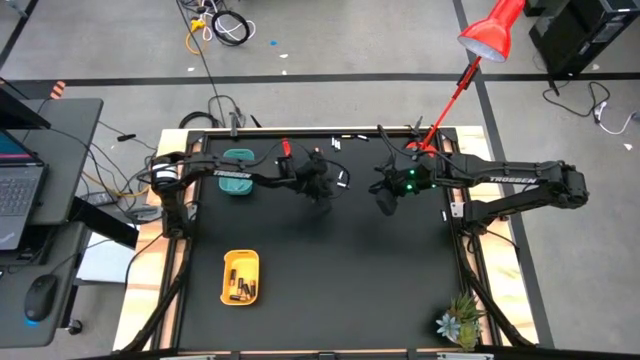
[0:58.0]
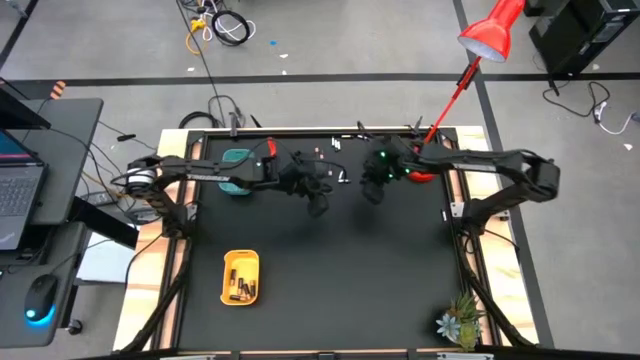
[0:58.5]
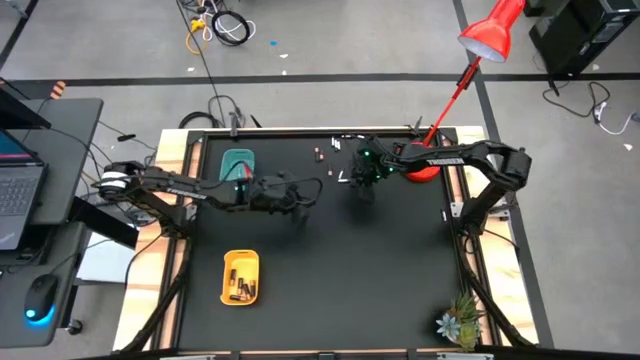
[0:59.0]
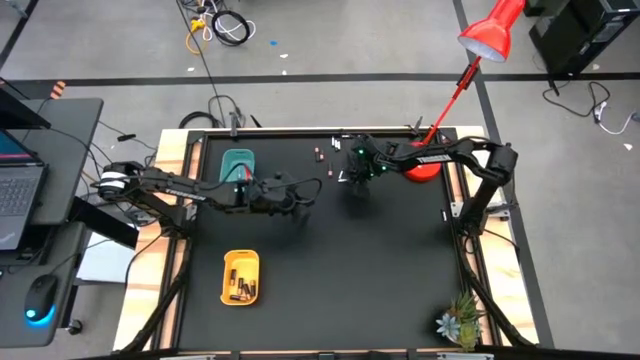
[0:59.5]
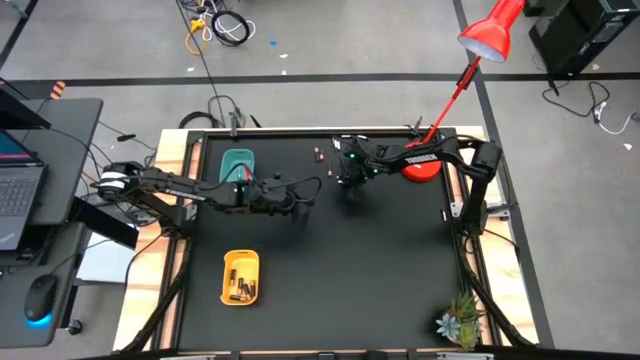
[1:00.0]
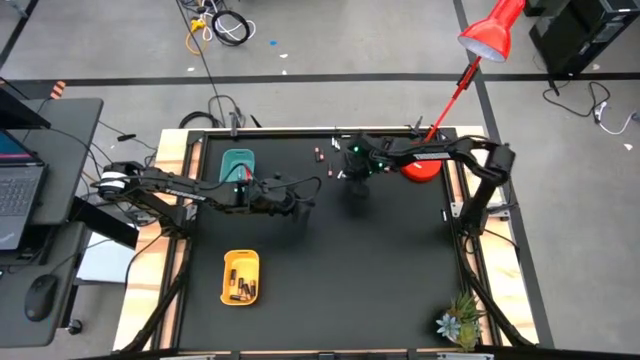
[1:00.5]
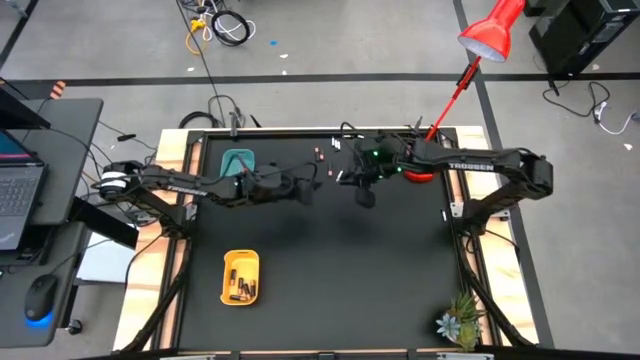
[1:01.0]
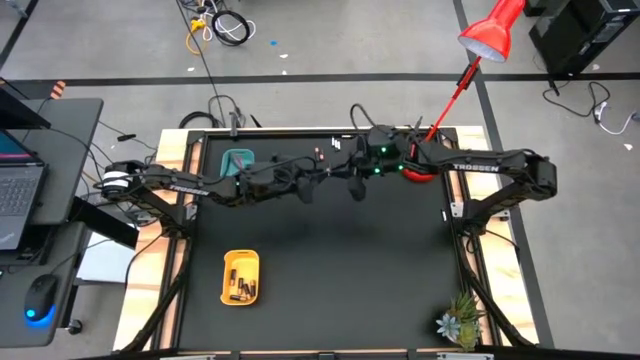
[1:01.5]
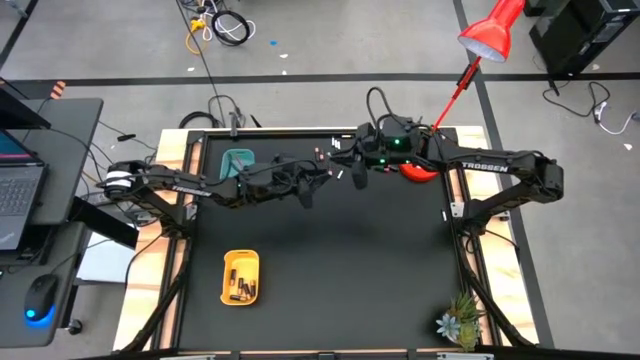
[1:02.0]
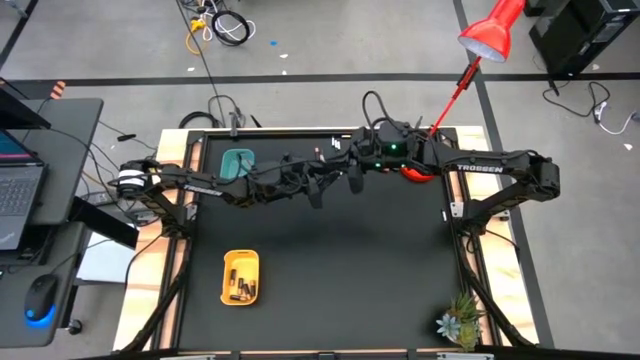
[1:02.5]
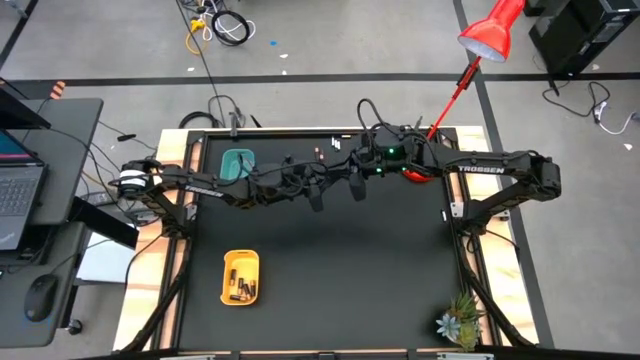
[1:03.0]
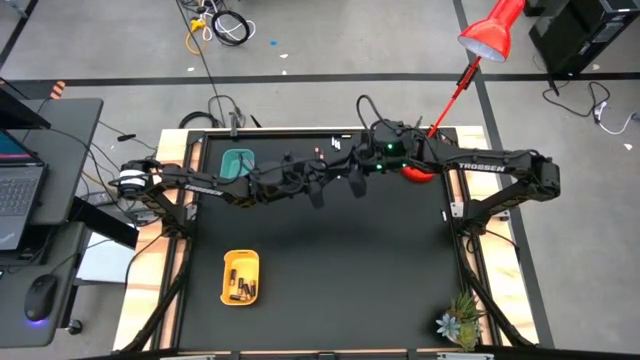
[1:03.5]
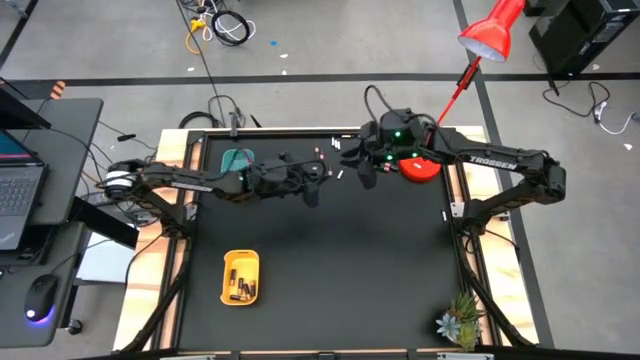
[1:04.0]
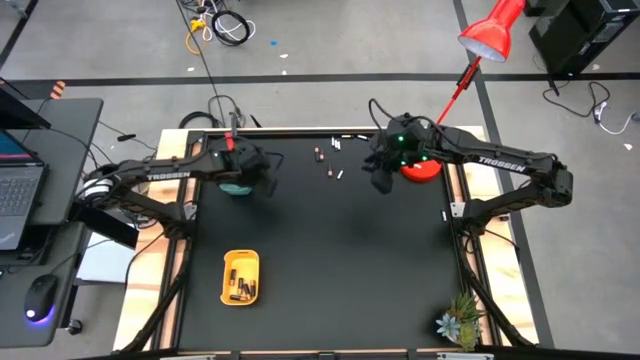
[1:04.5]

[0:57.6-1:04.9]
Task: Sort batteries
Put the white battery into the blue bin

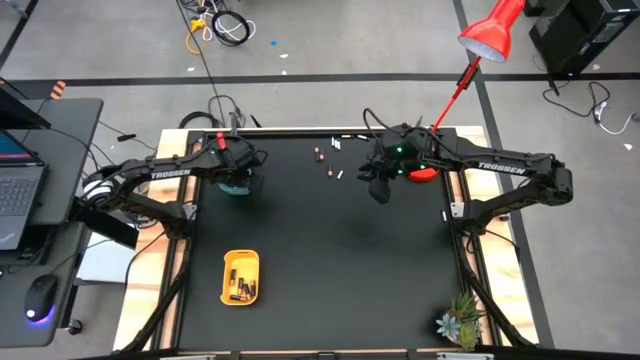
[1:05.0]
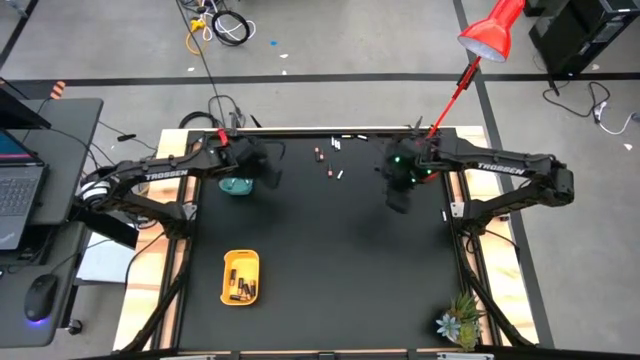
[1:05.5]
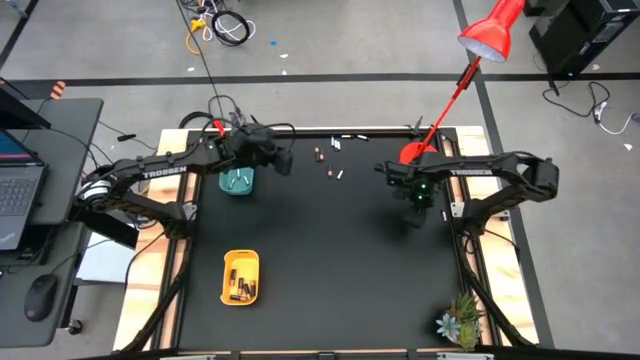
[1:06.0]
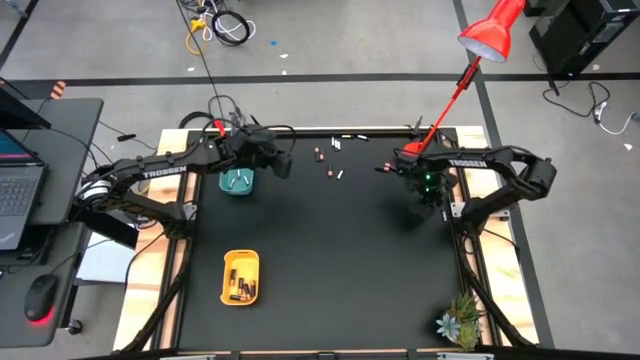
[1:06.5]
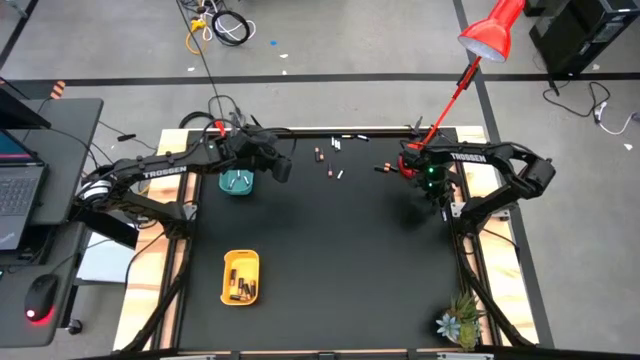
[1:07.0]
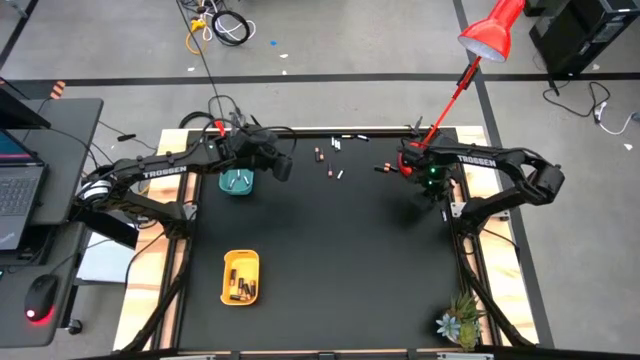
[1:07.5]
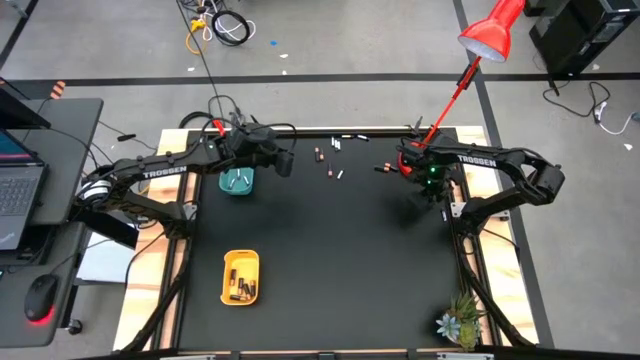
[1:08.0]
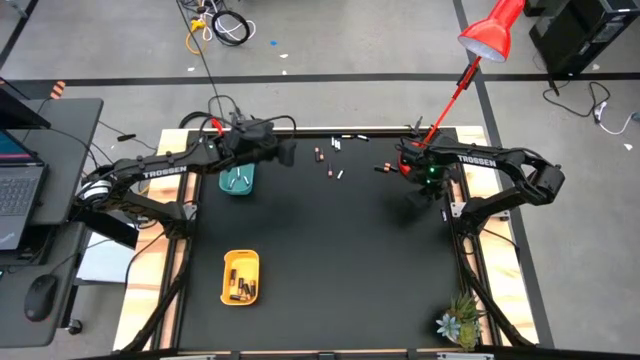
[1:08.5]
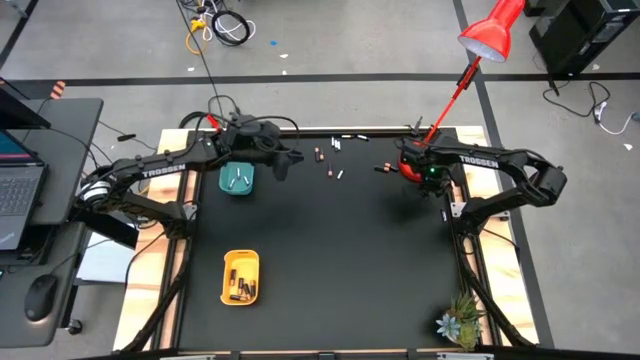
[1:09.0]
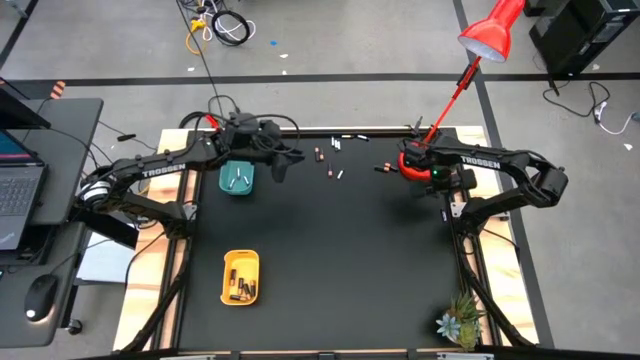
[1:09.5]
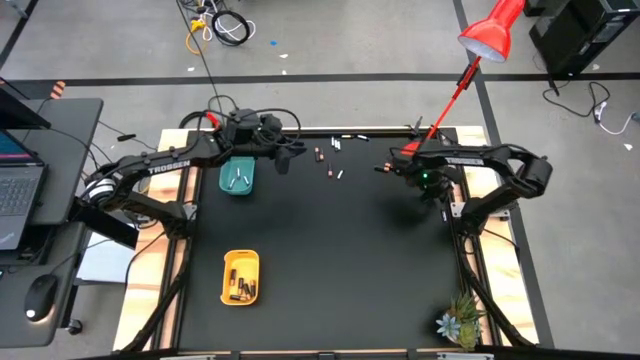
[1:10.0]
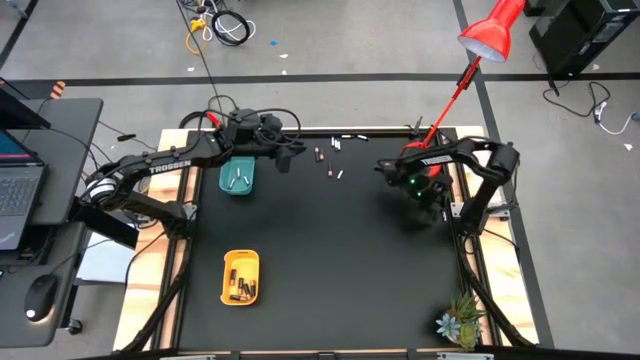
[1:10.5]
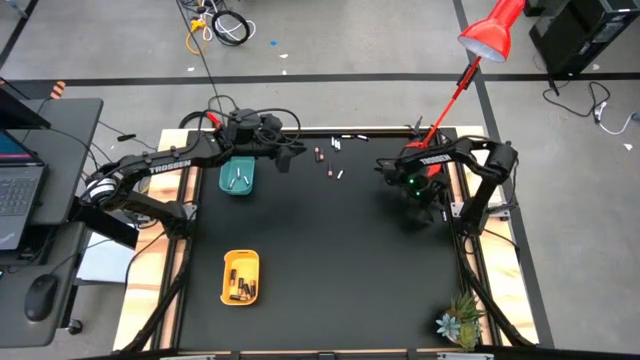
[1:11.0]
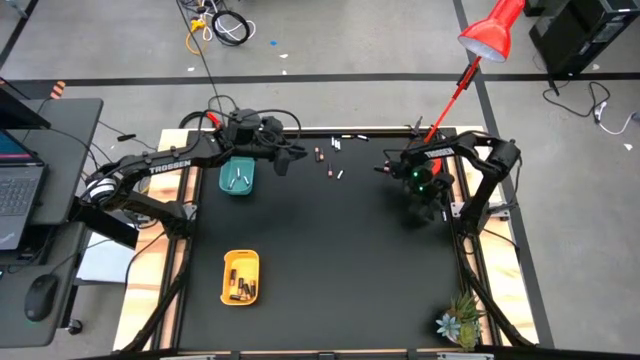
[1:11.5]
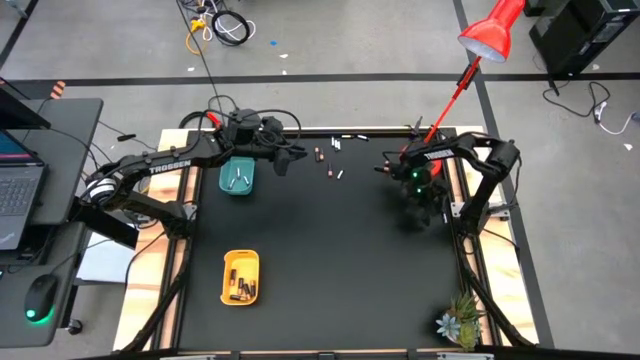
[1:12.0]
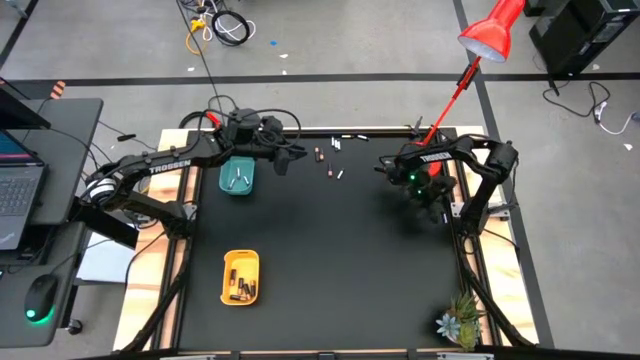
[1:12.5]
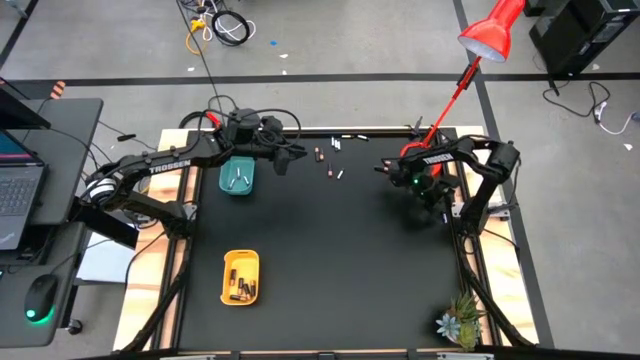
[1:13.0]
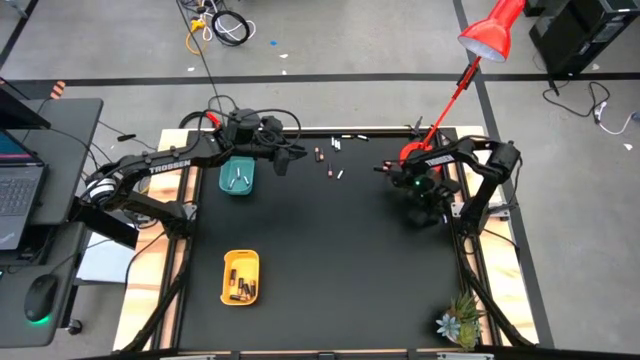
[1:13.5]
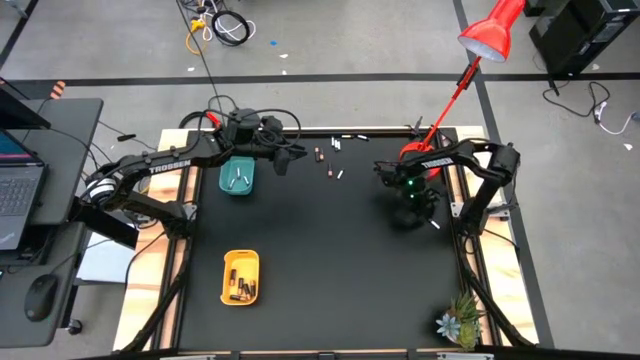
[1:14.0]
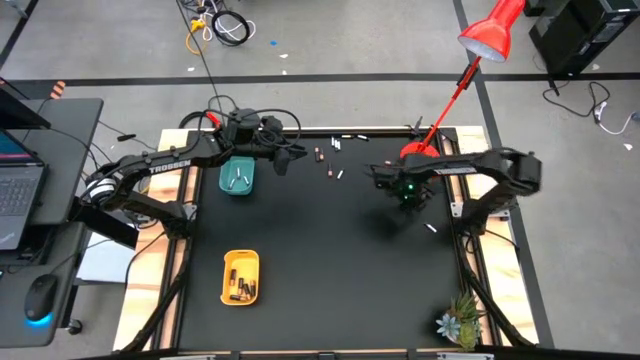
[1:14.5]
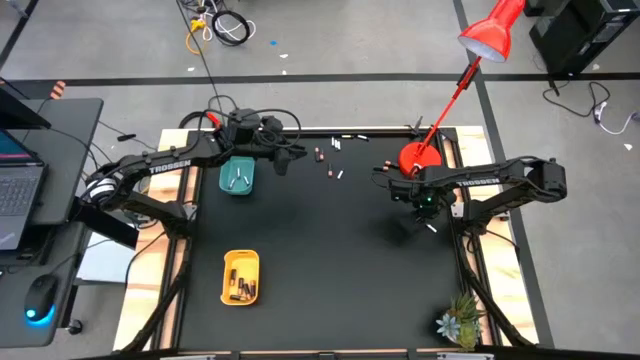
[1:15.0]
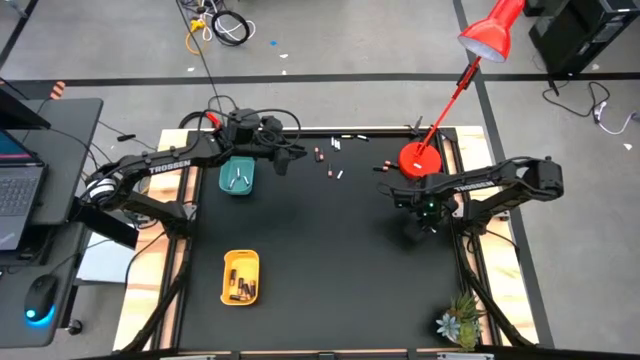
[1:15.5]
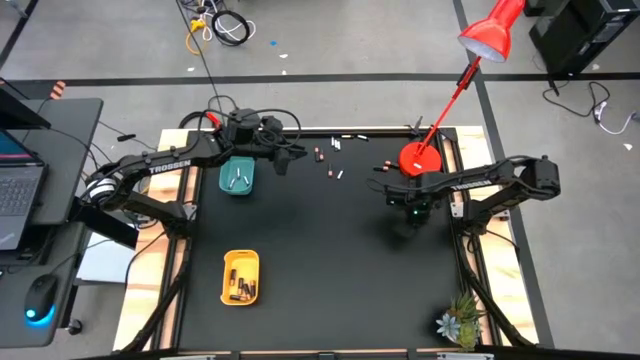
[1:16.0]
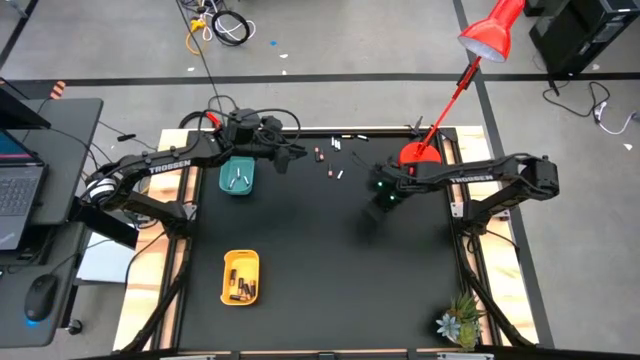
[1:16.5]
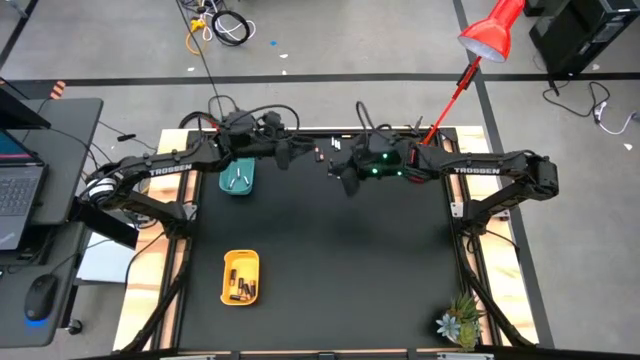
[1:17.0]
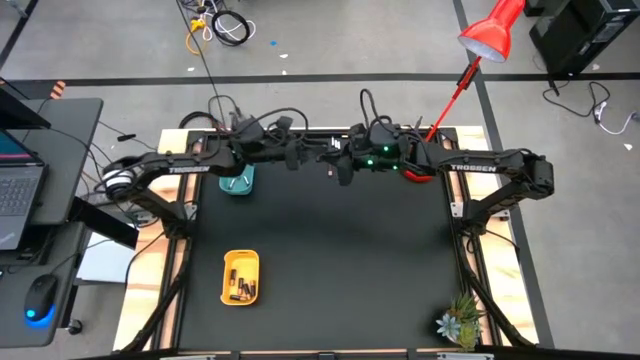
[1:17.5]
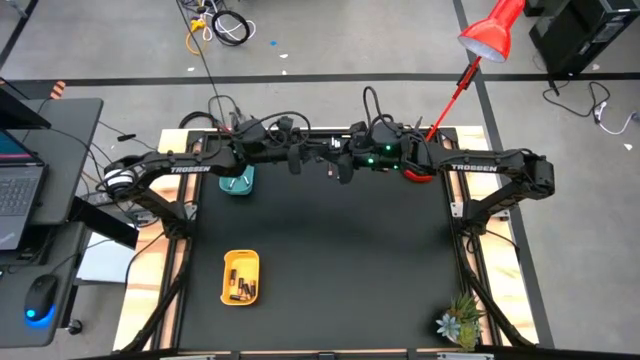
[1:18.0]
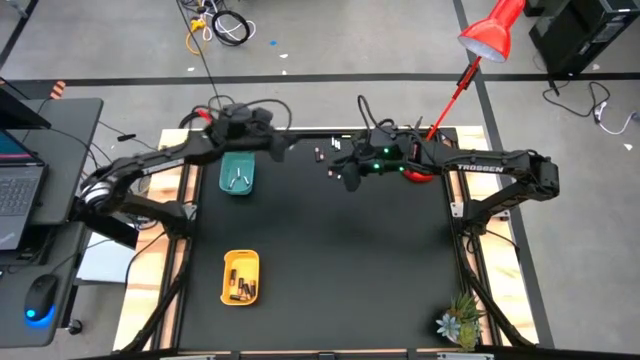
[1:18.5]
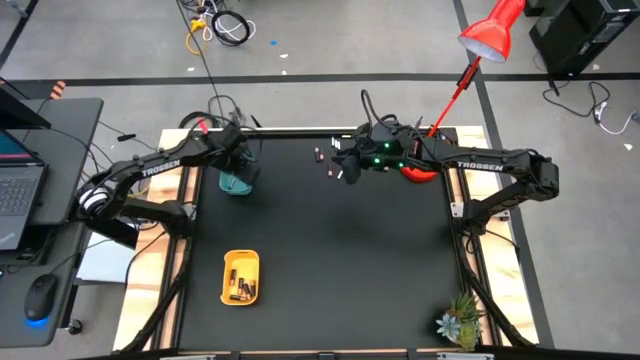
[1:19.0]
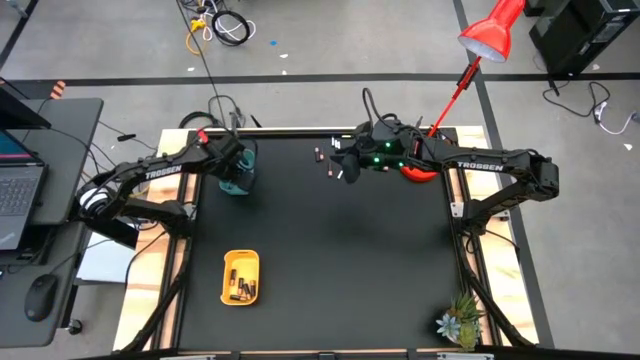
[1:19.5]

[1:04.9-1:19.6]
Put the white battery into the blue bin
